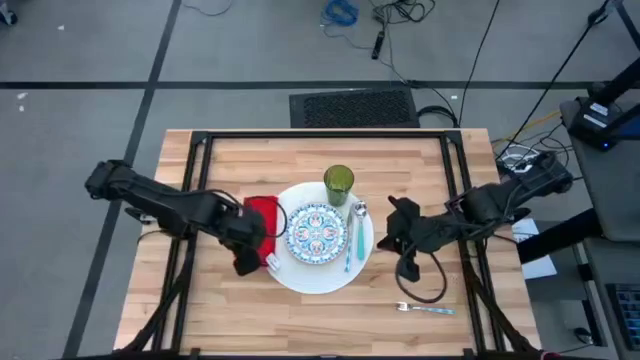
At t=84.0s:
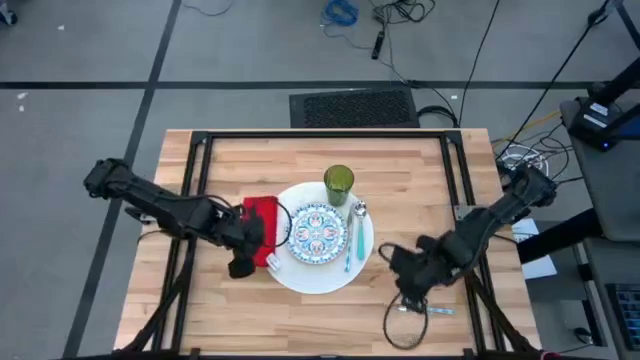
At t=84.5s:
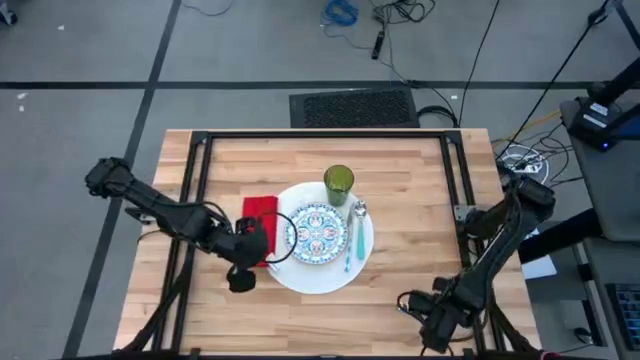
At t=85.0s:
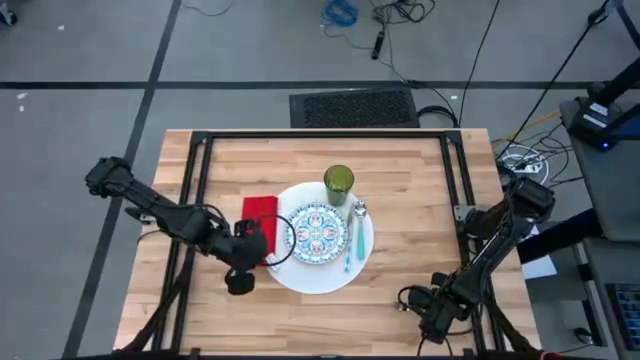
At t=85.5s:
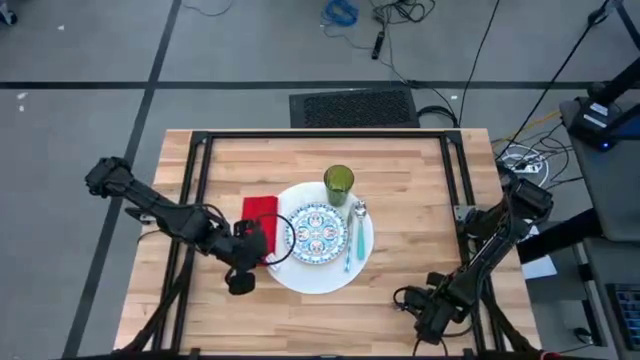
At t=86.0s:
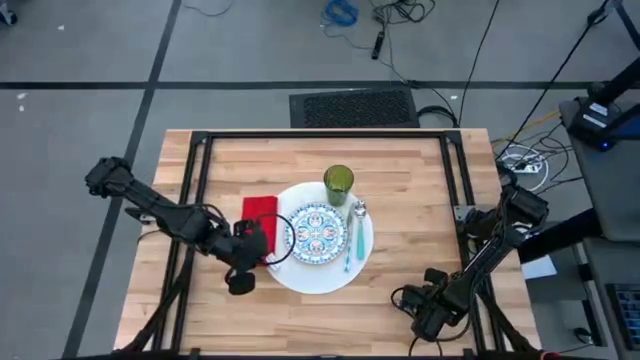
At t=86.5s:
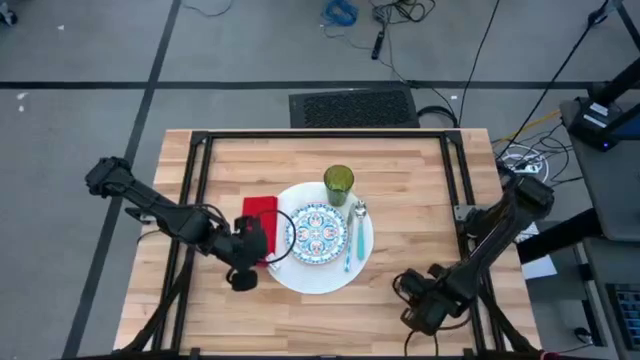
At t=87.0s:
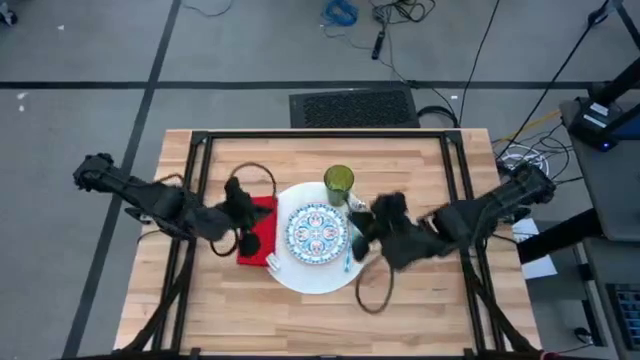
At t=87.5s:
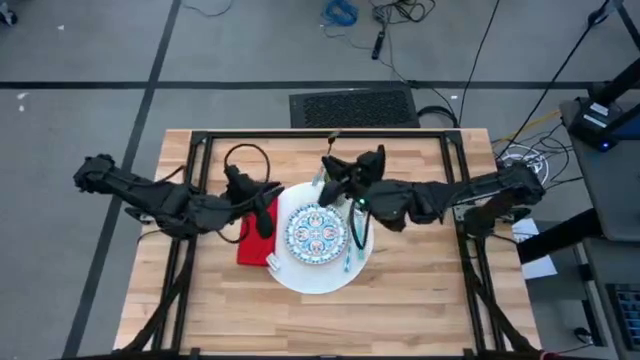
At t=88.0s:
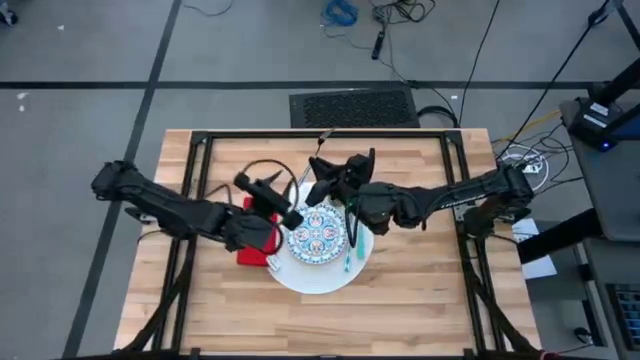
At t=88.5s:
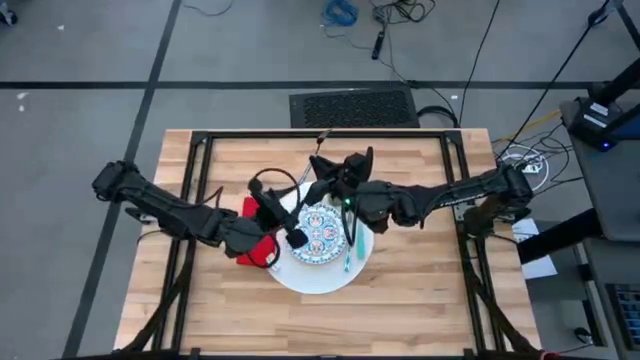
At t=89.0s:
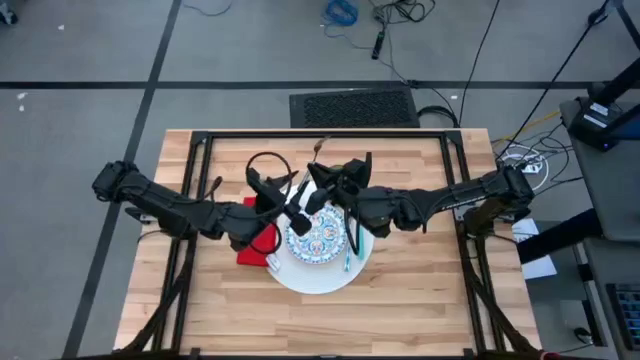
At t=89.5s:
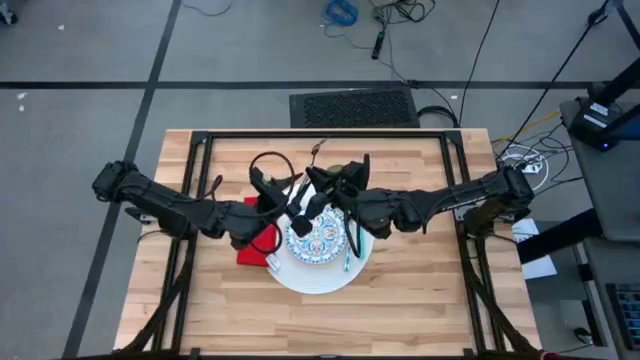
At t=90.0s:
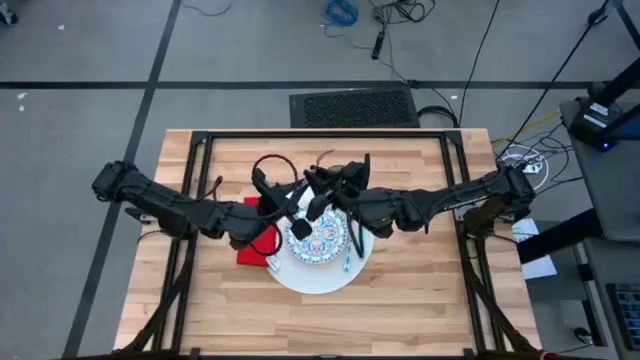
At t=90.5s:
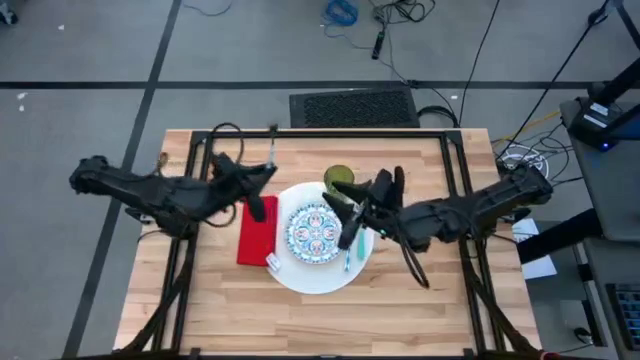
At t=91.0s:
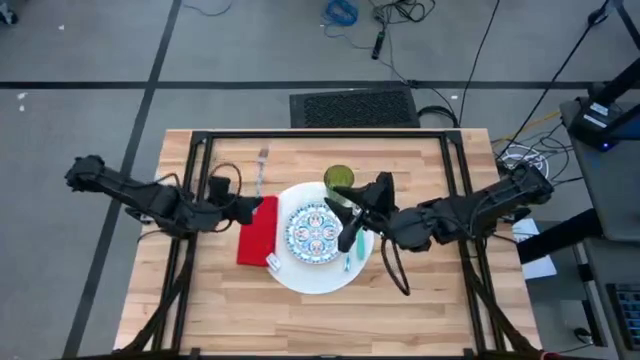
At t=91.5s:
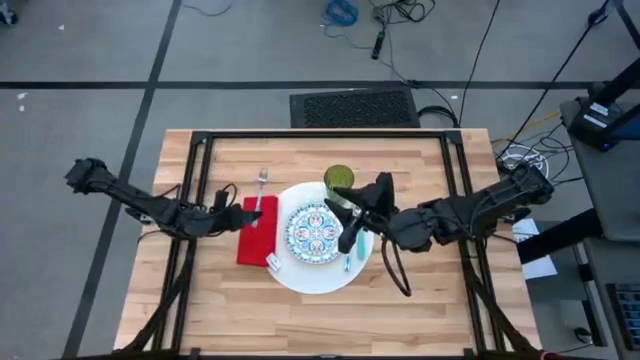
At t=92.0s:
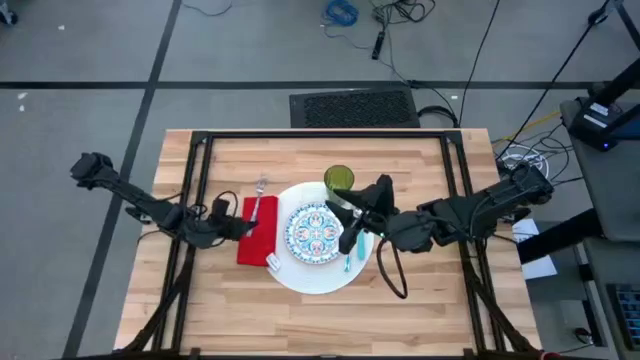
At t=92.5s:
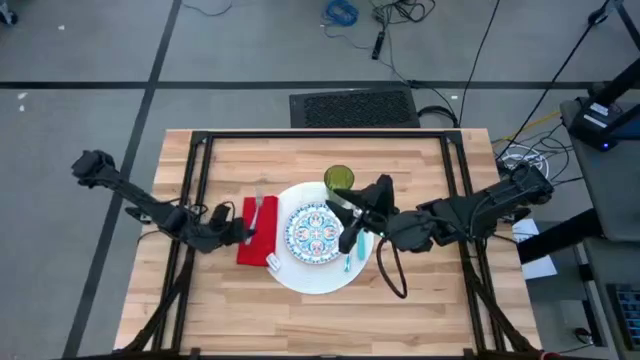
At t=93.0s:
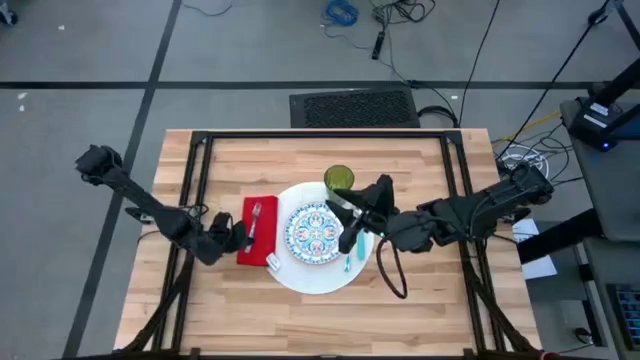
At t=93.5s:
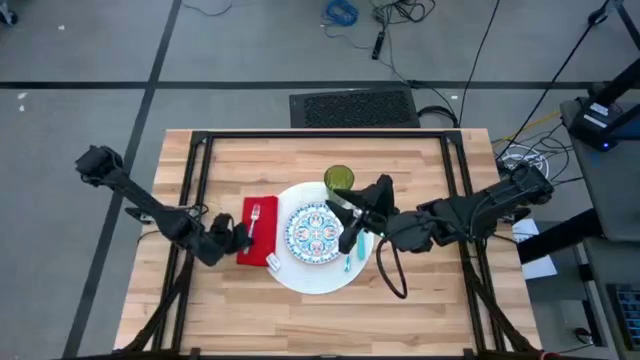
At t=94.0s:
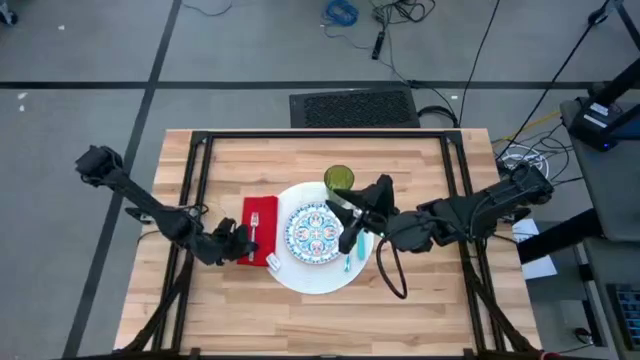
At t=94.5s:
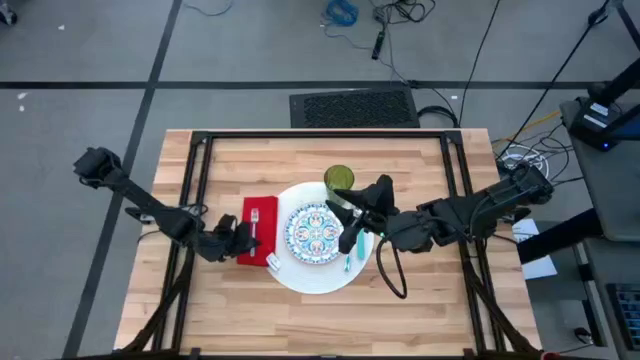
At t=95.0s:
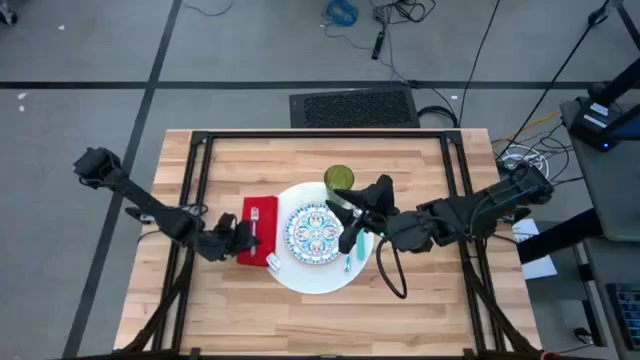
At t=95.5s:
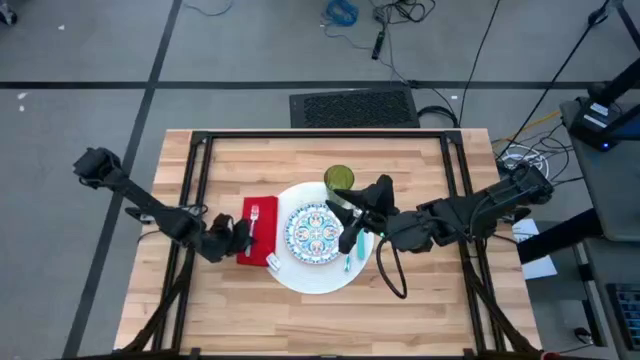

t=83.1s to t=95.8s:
Task: Set table place
Put the white fork on the red napkin on the white table placemat

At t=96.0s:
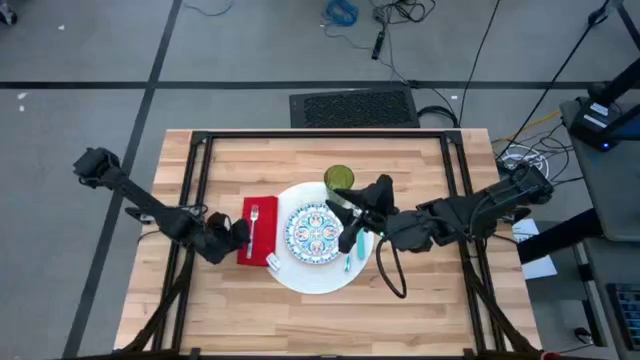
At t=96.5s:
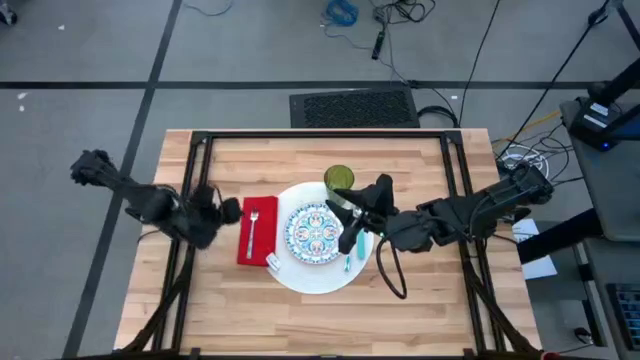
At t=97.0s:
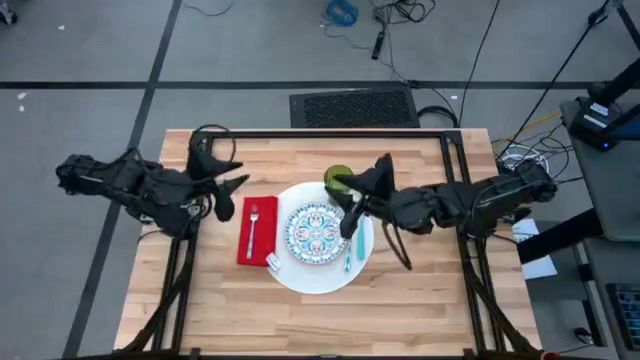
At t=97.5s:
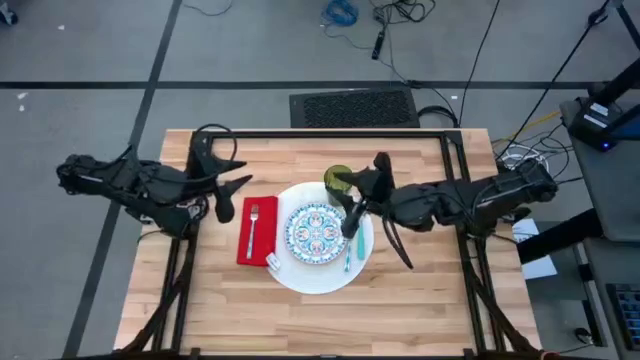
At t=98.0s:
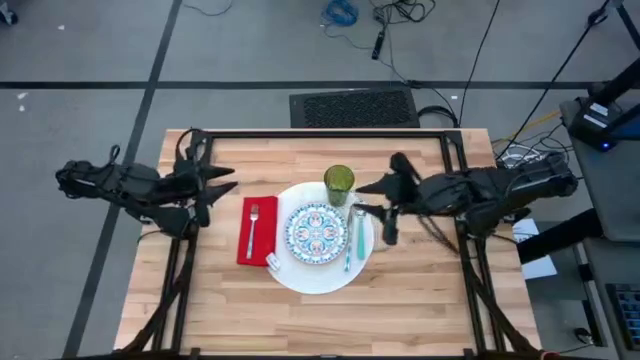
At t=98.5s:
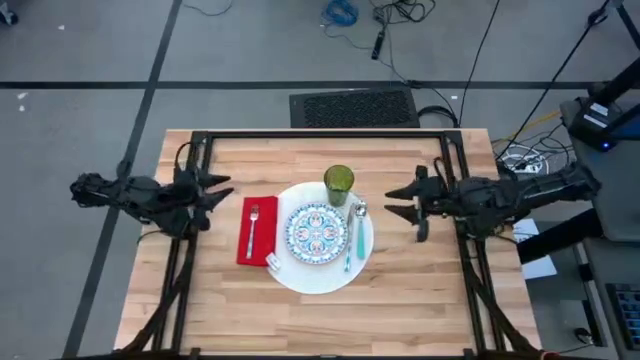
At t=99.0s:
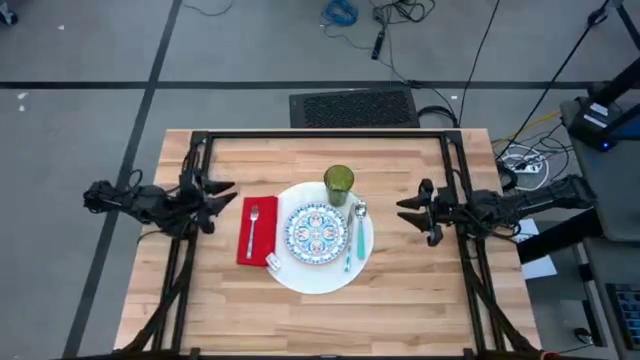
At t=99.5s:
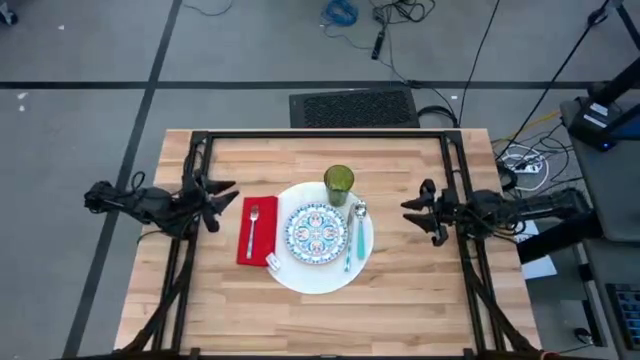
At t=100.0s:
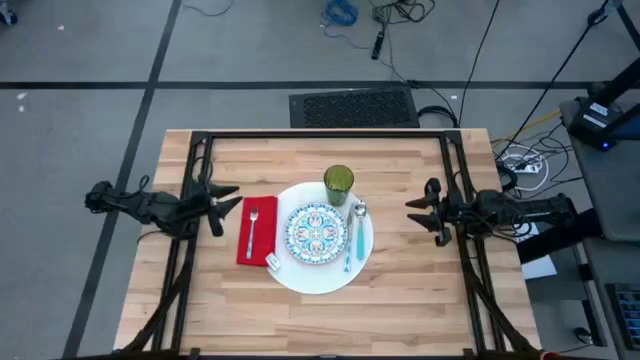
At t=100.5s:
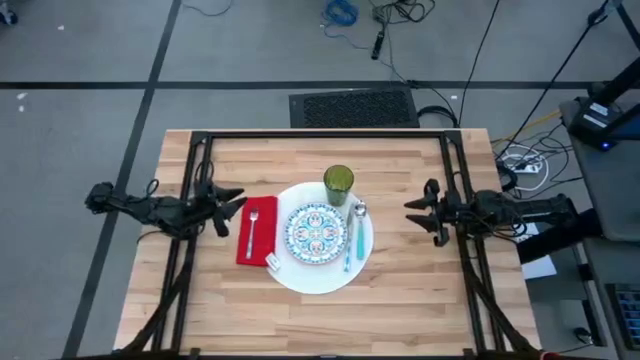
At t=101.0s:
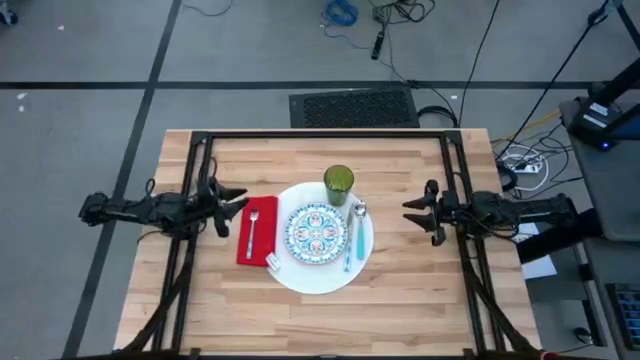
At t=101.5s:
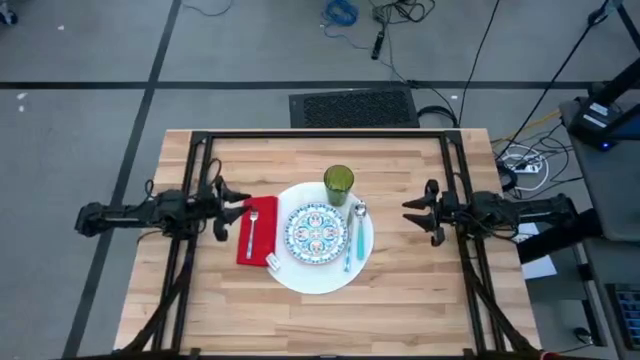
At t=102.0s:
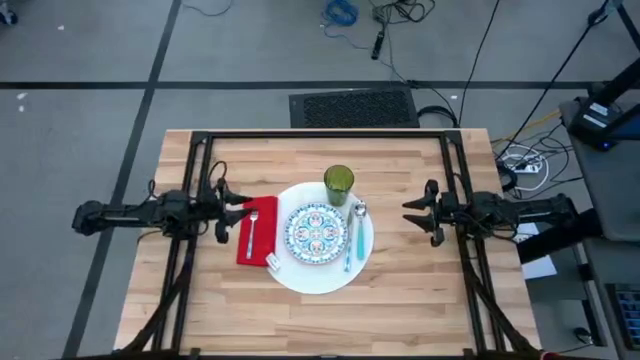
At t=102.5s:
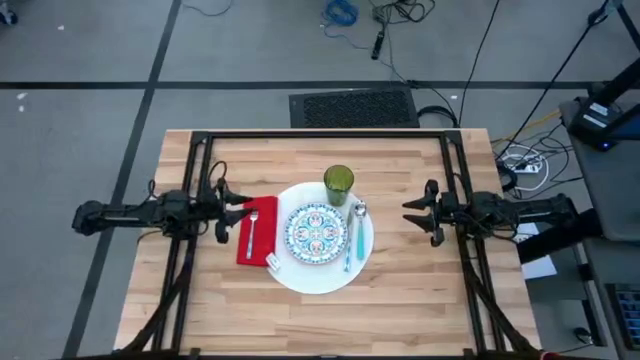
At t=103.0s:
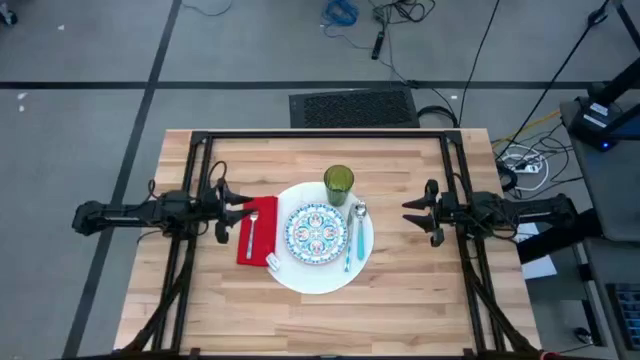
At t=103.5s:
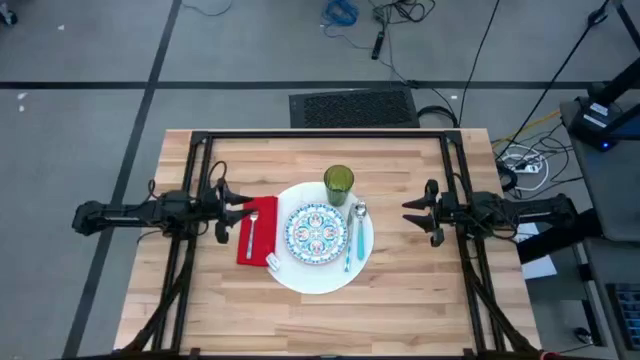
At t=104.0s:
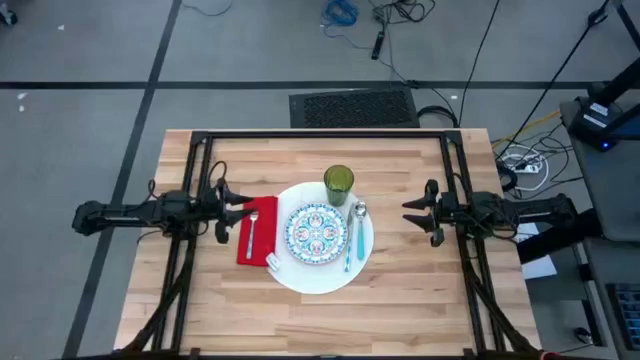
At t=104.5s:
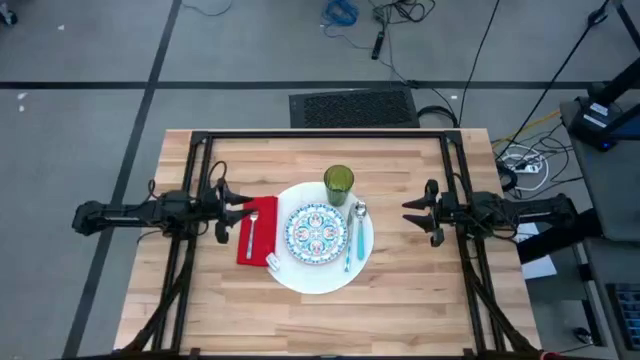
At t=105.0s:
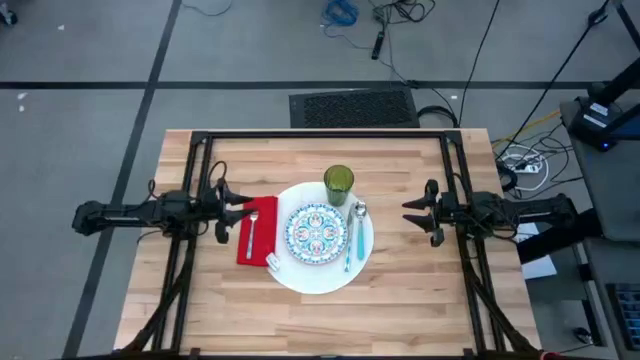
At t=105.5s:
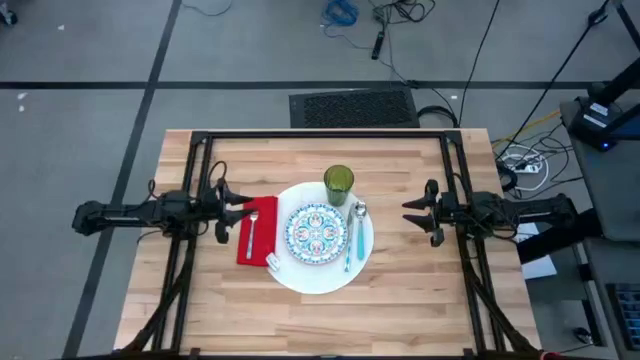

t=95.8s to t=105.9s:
Return to Home Position
